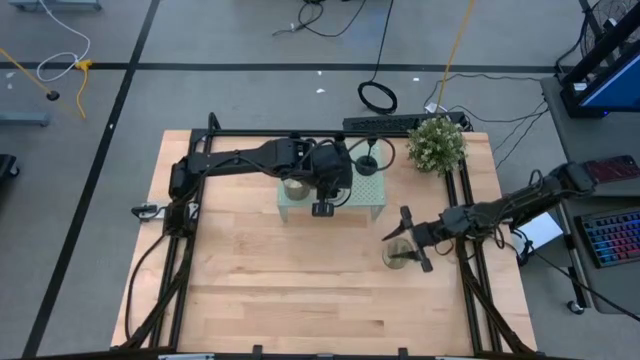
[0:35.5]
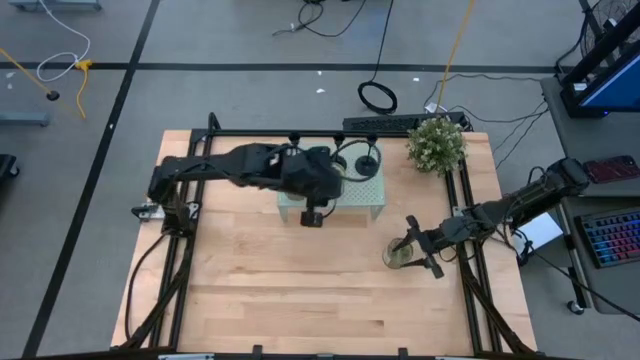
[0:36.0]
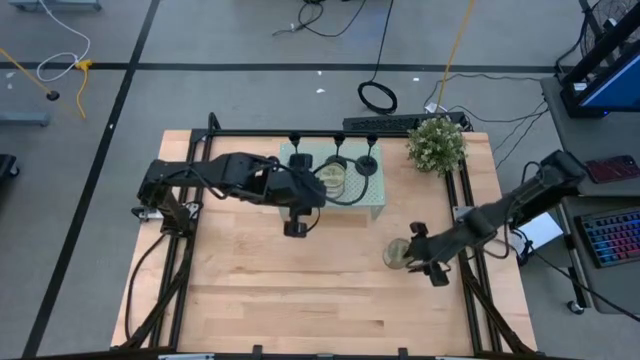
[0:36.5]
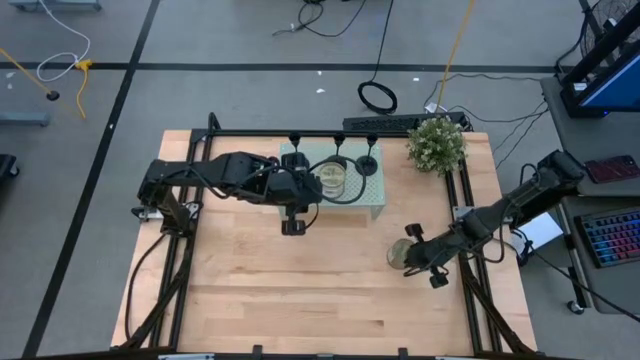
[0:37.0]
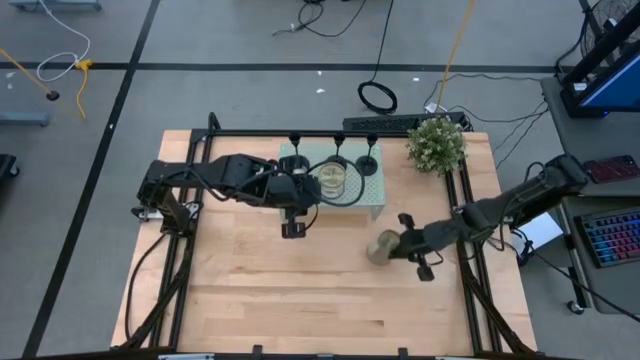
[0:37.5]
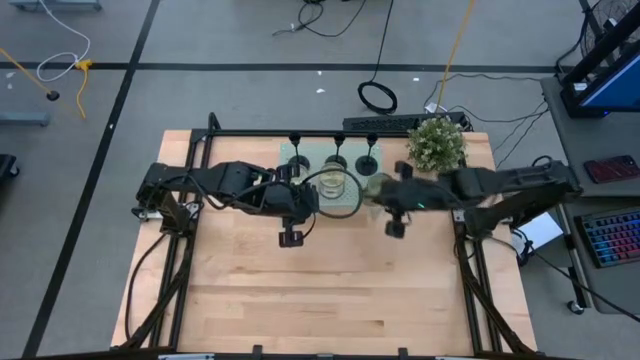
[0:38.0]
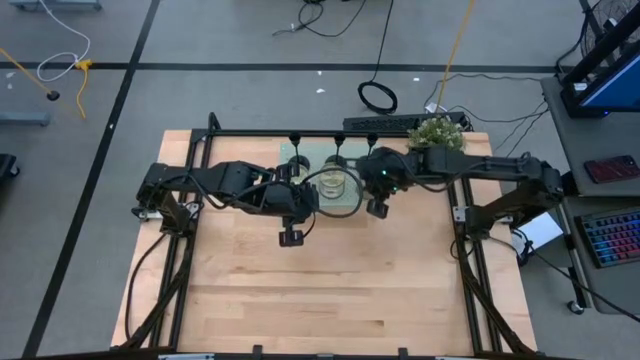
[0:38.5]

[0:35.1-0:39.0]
Task: Stock candles and holders on shelf
Align the scented candle on the shelf with the other scented candles

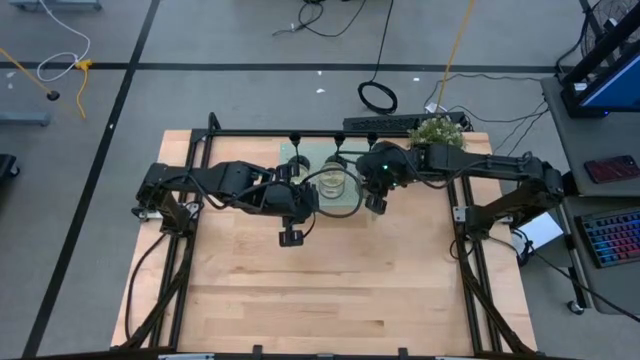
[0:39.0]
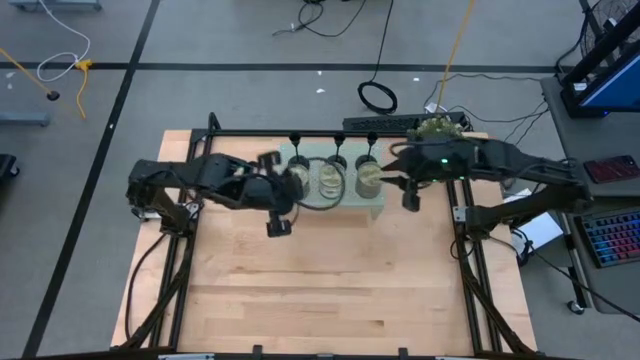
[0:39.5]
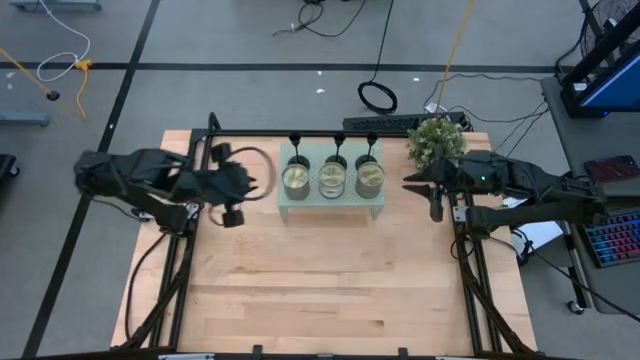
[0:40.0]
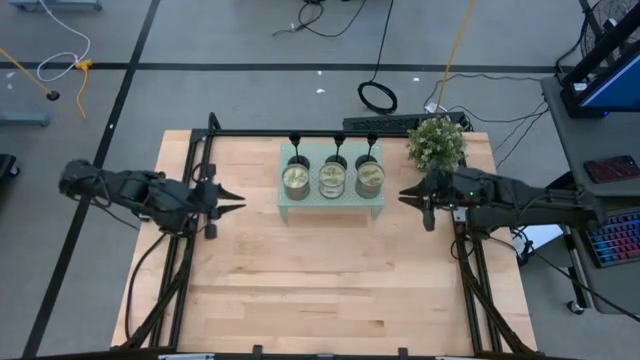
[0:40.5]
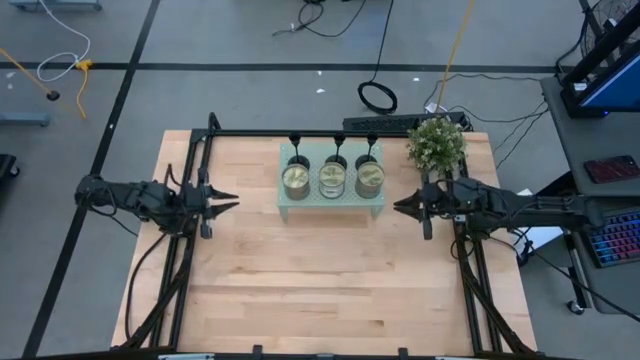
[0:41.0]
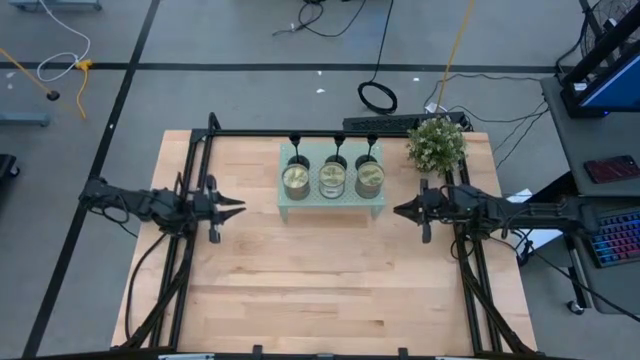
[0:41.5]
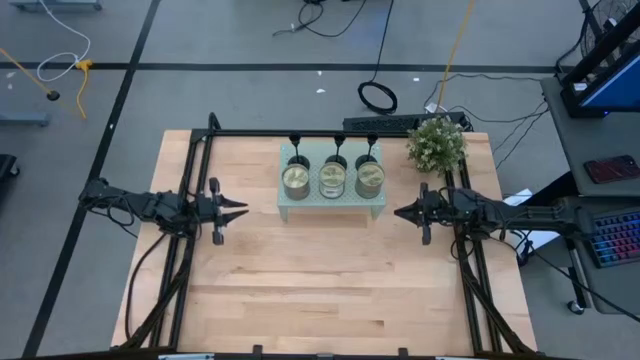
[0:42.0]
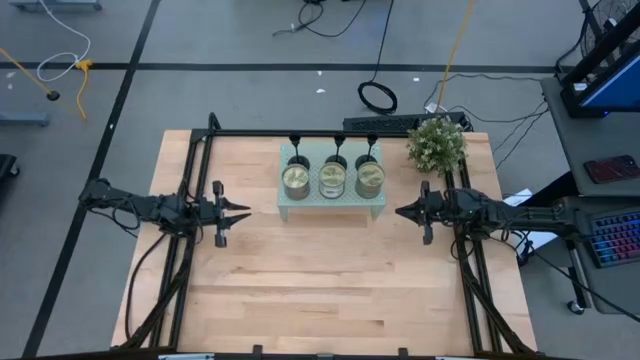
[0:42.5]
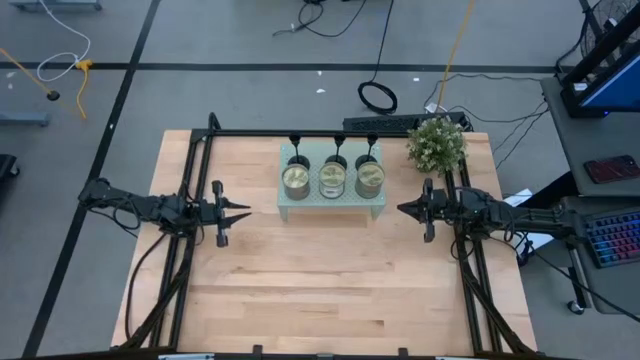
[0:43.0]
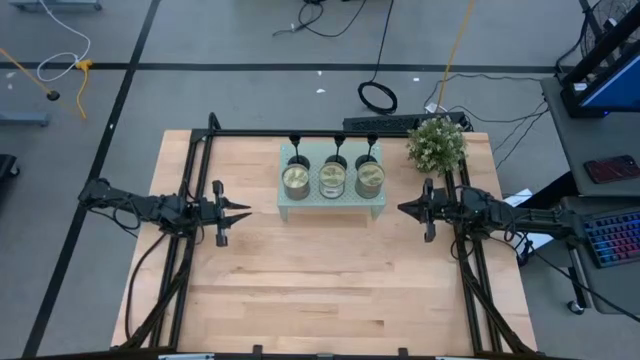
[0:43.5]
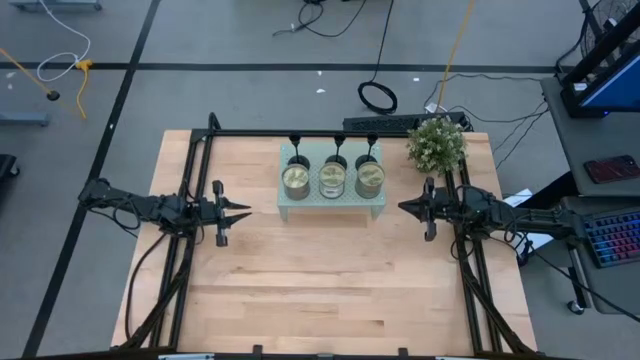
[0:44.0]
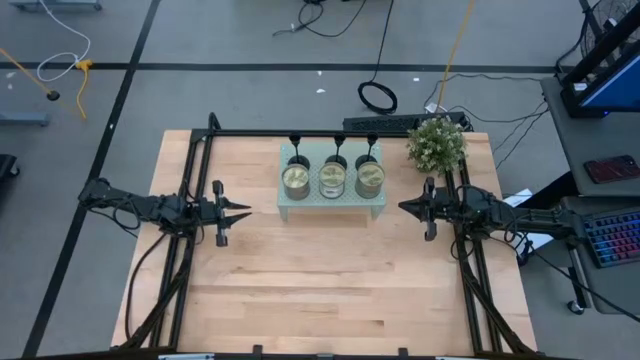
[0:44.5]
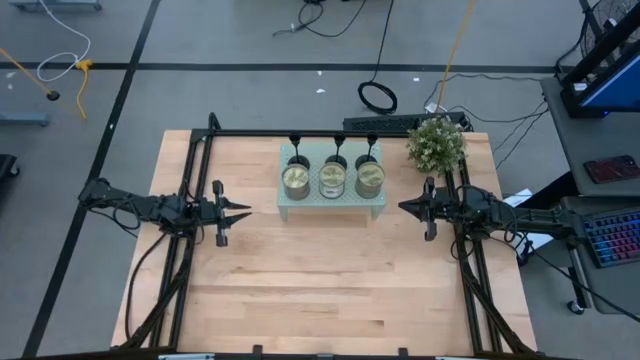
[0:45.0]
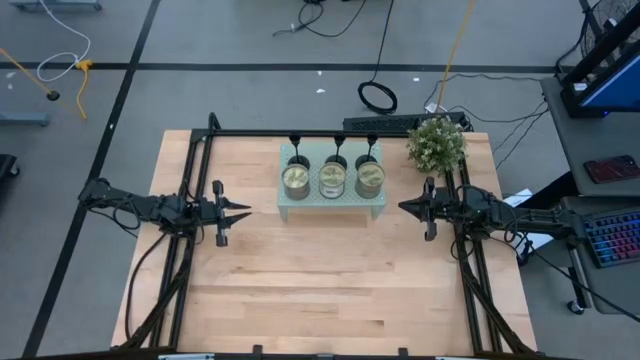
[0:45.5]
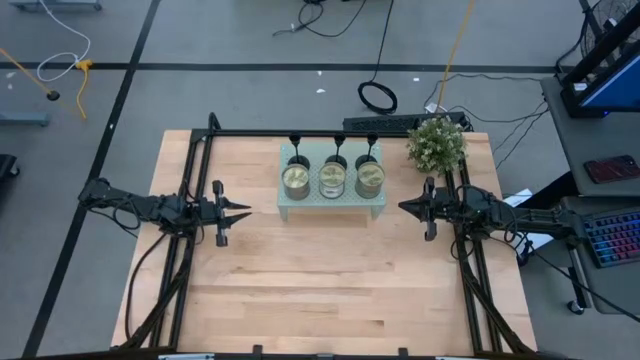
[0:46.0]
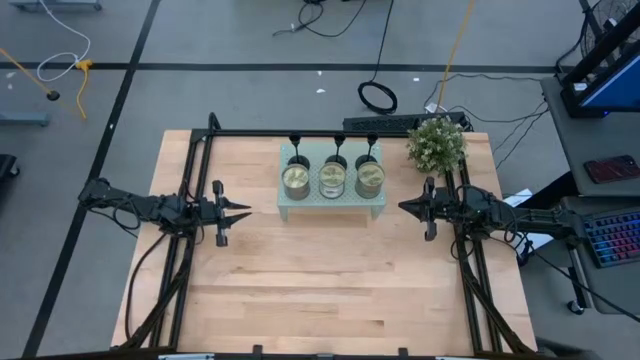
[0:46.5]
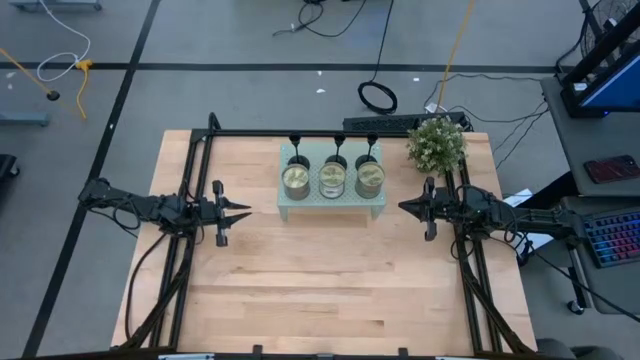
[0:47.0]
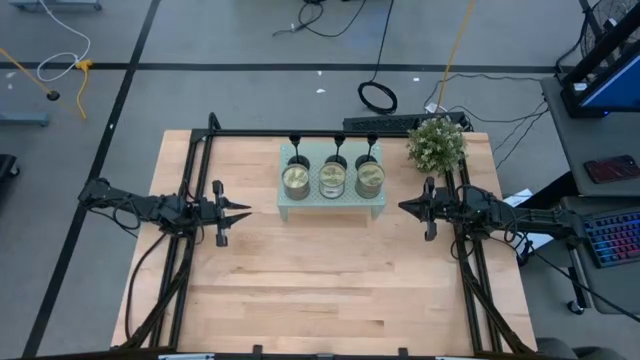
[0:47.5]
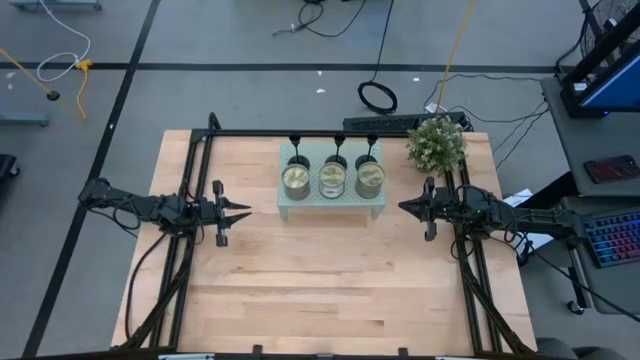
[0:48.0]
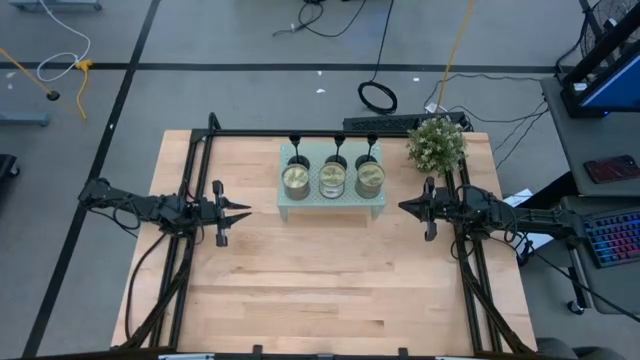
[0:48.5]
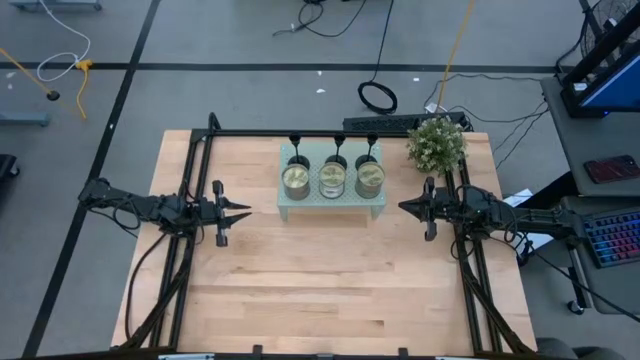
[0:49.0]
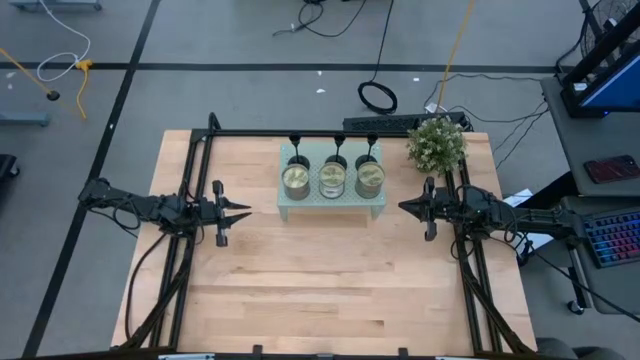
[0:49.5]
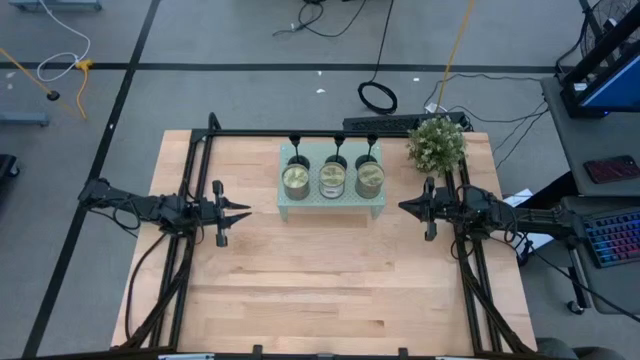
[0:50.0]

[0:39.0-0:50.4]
Return to Home Position

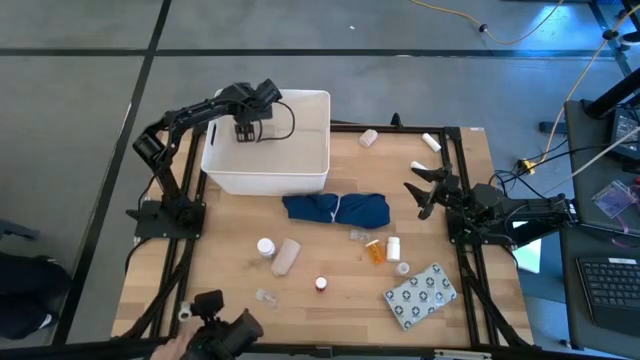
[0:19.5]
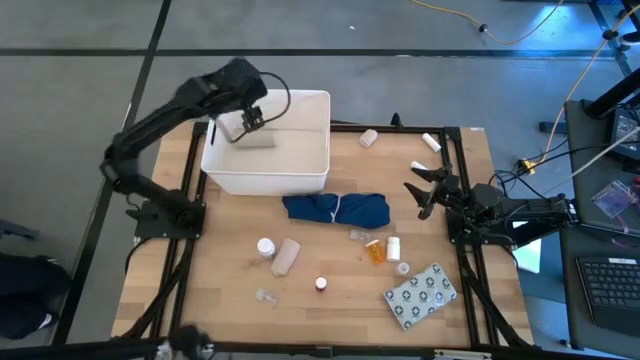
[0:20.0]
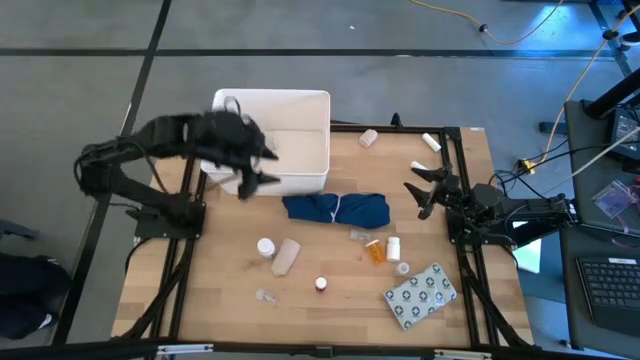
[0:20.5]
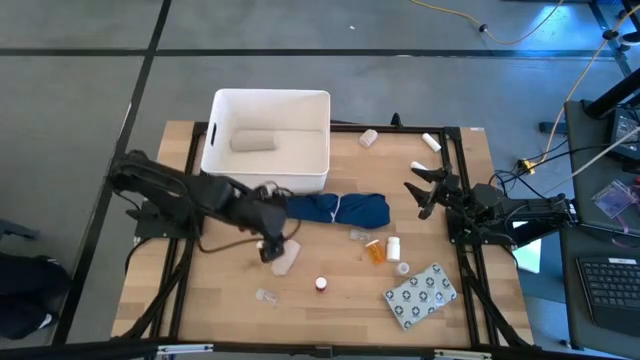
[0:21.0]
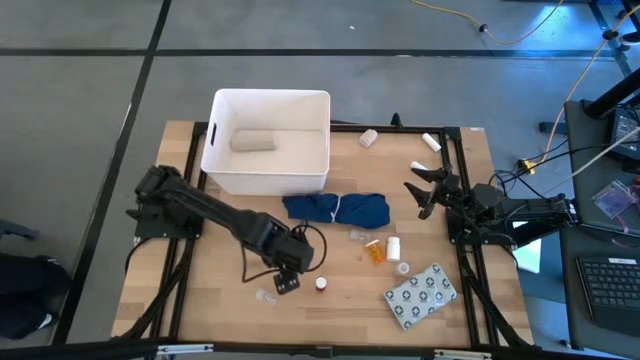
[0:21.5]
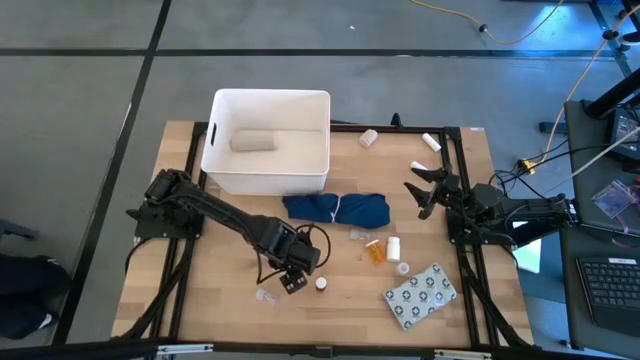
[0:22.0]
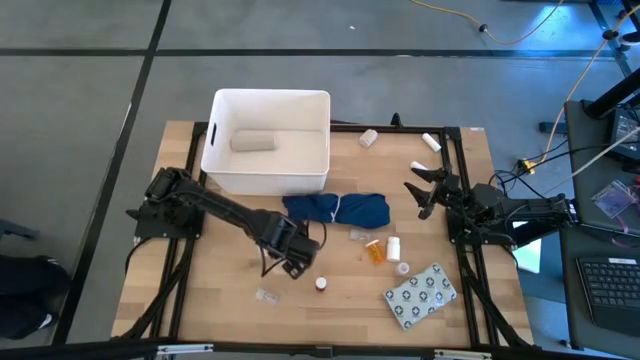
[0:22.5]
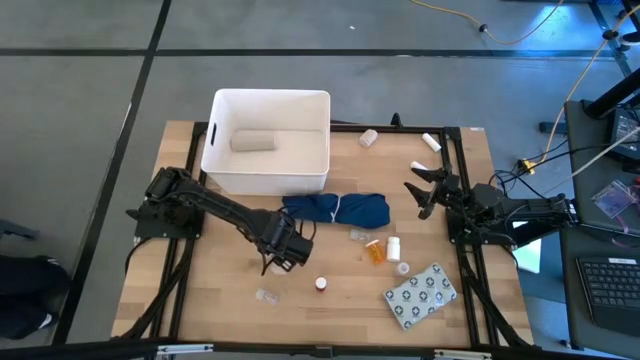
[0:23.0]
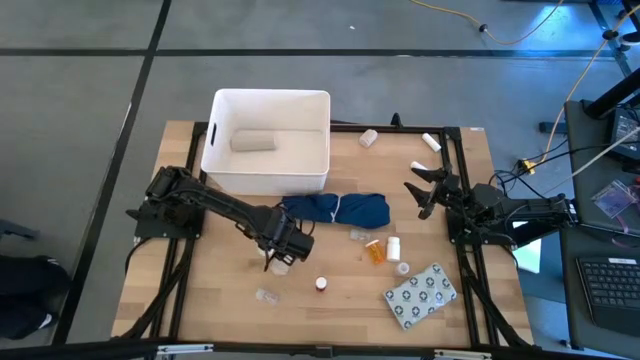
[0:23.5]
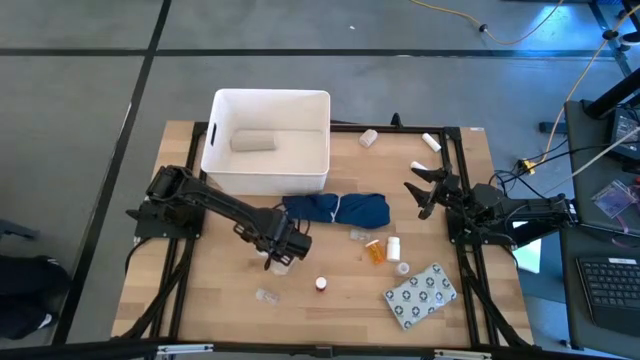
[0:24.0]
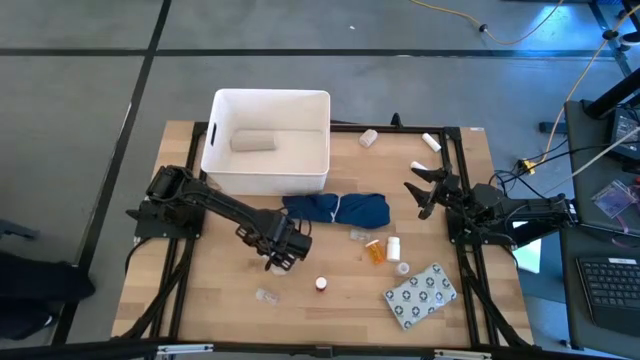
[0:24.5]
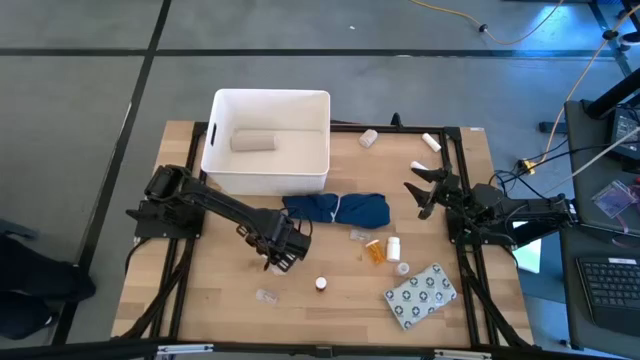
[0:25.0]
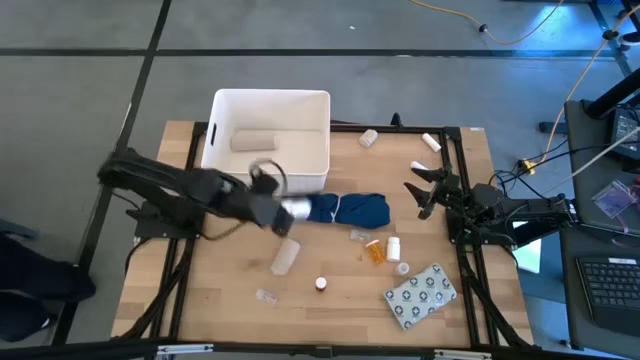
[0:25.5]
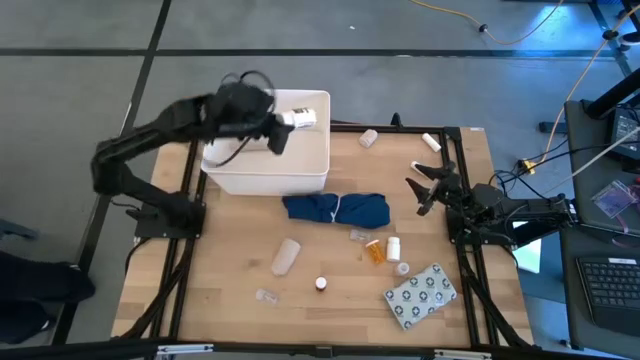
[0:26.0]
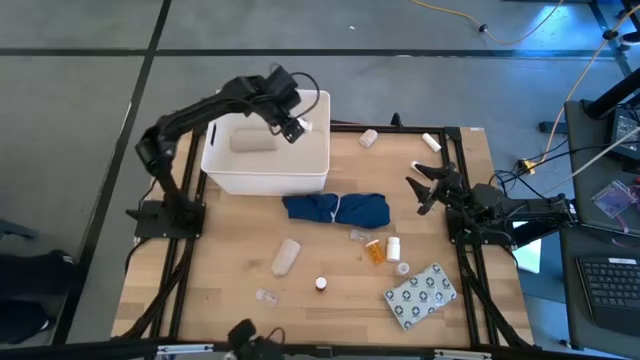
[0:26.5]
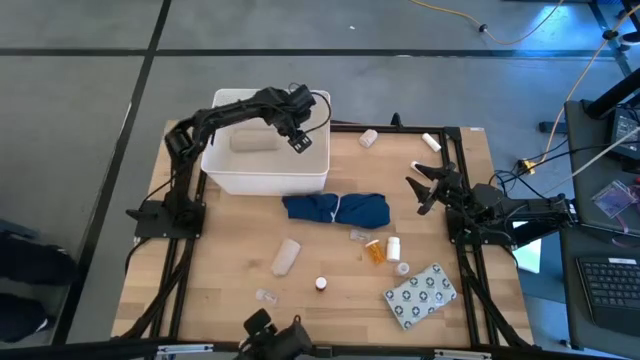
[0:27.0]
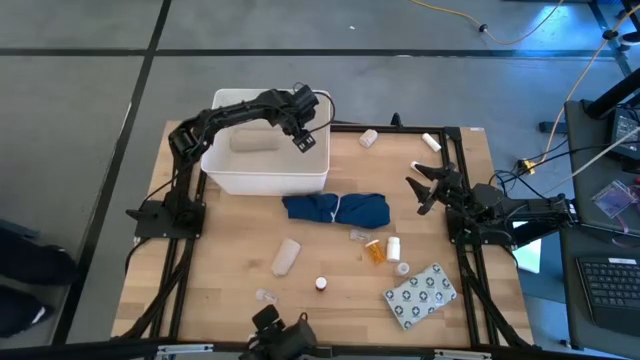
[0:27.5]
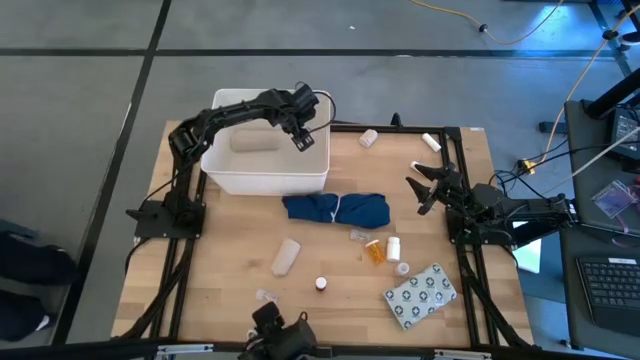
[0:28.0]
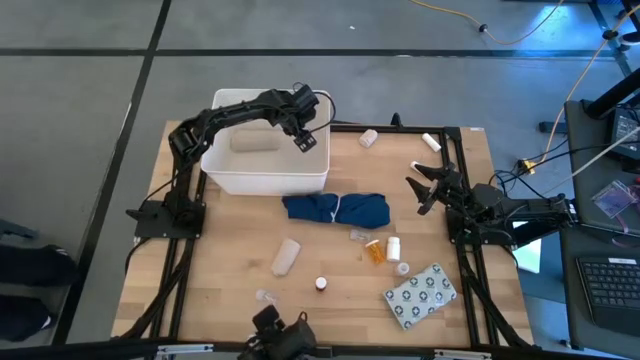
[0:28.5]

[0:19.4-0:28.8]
Task: Pick & place medical supplies in basket/bin
Put the left white pill bottle into the white container
